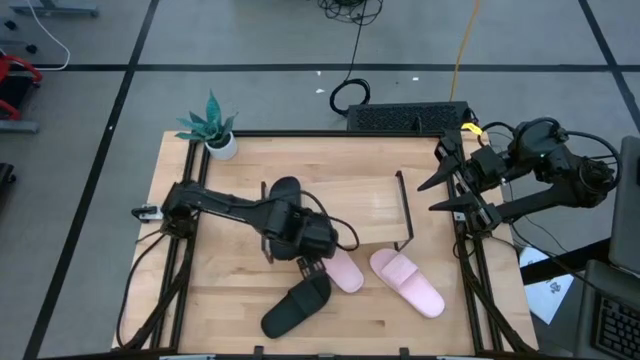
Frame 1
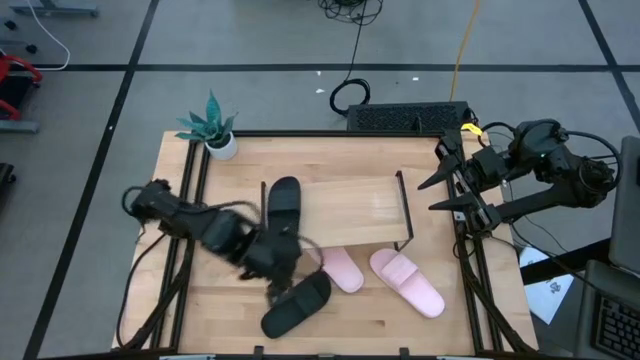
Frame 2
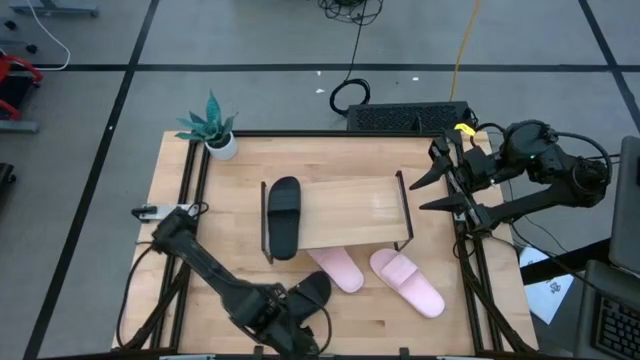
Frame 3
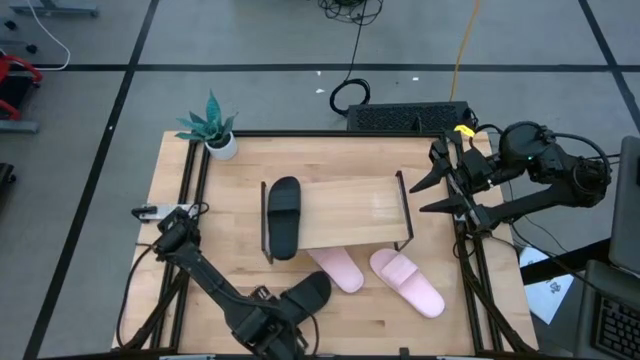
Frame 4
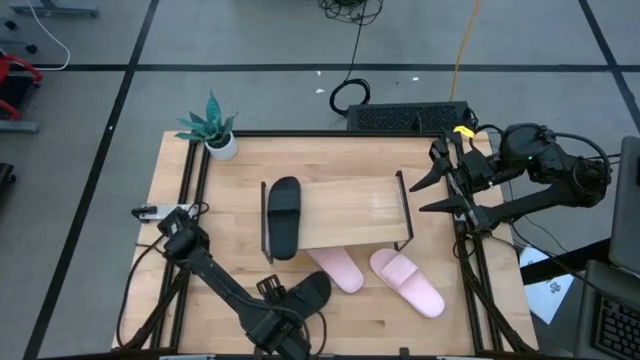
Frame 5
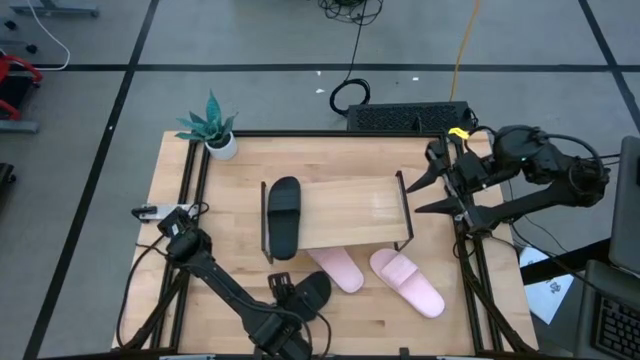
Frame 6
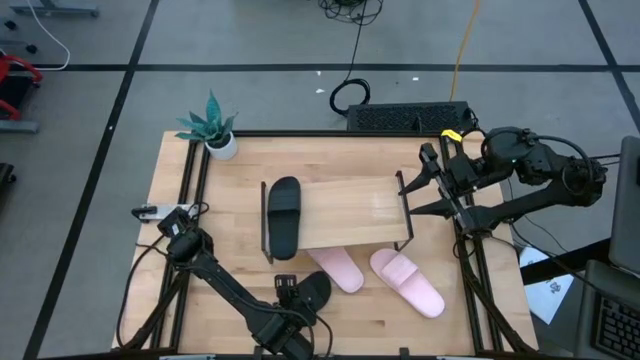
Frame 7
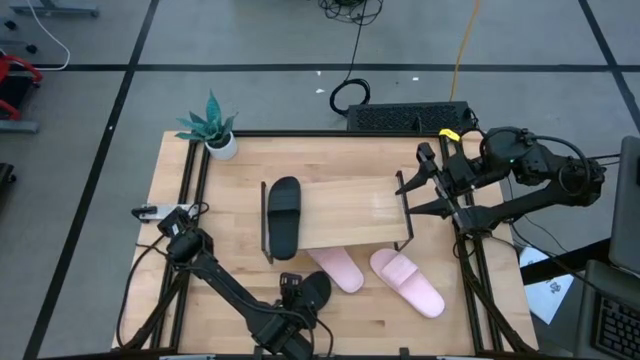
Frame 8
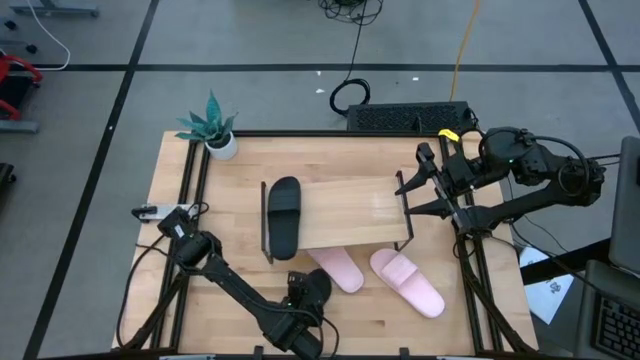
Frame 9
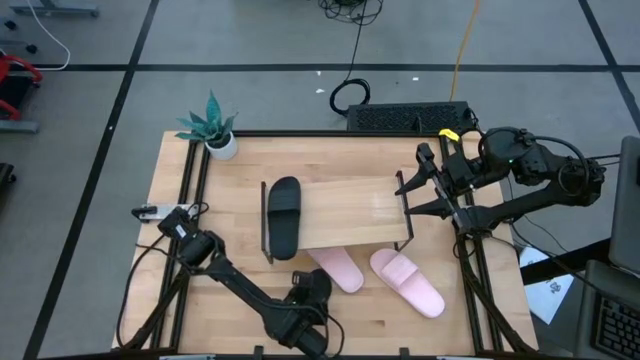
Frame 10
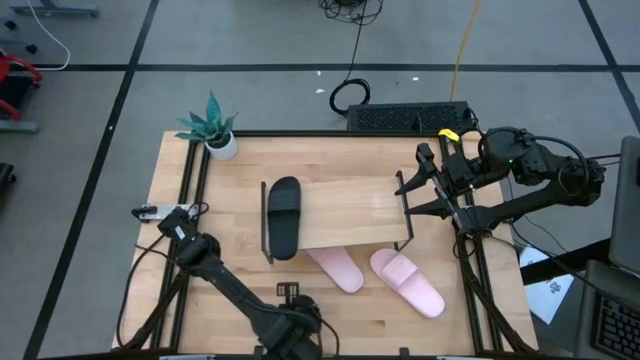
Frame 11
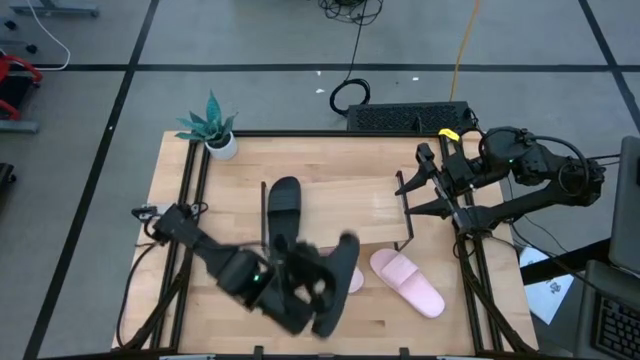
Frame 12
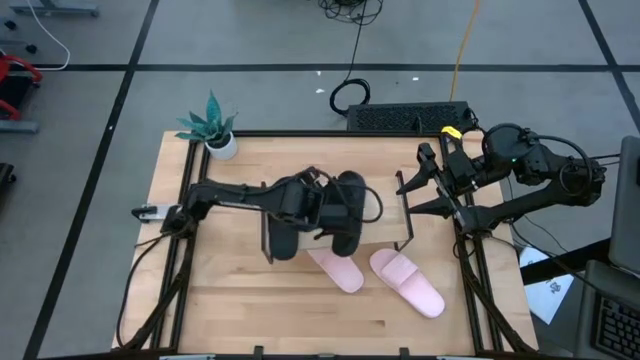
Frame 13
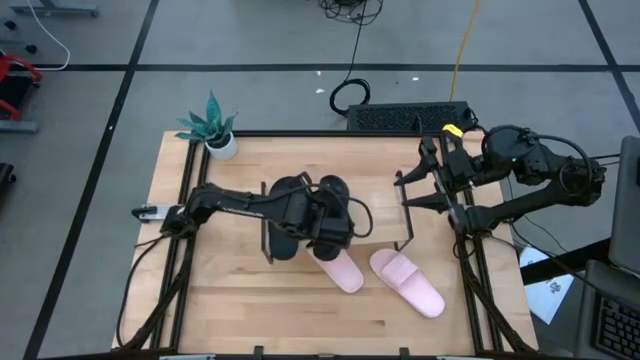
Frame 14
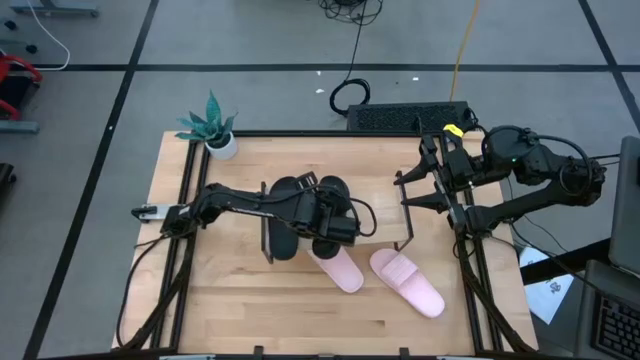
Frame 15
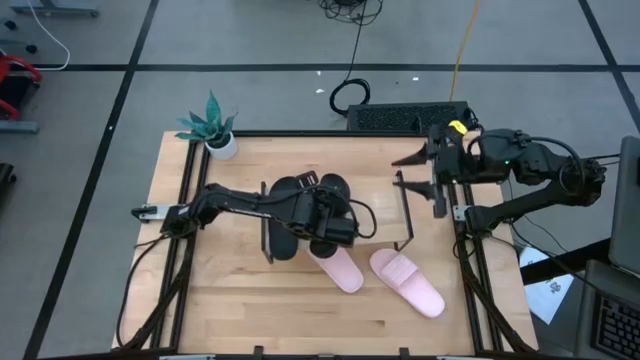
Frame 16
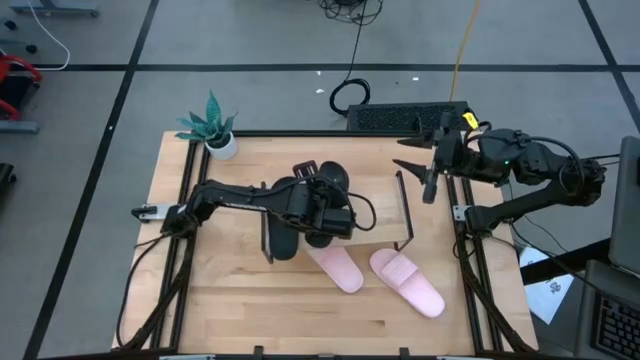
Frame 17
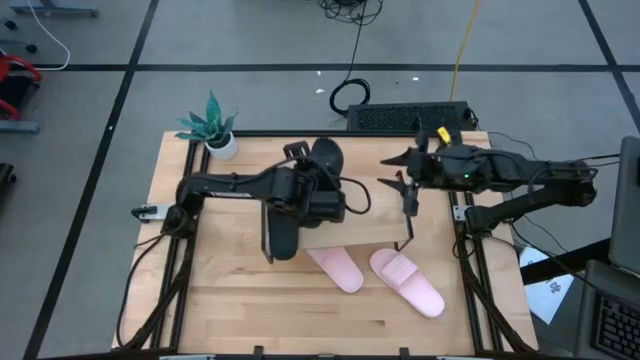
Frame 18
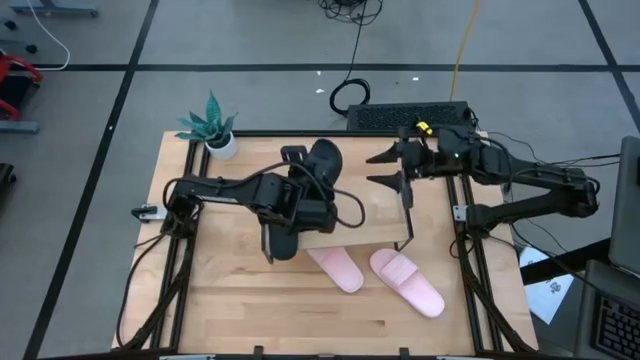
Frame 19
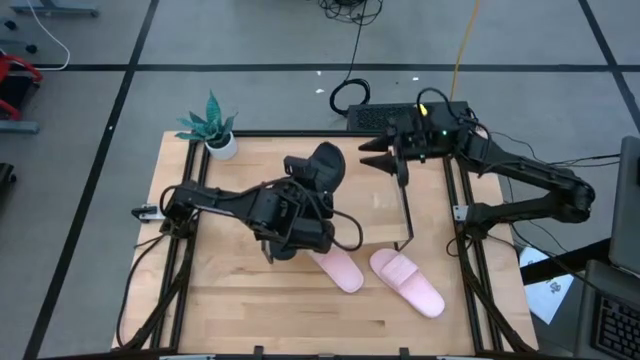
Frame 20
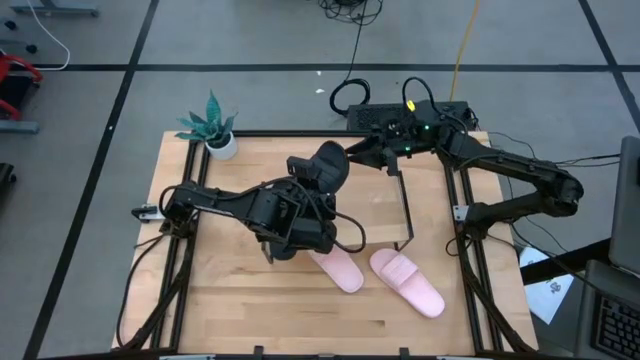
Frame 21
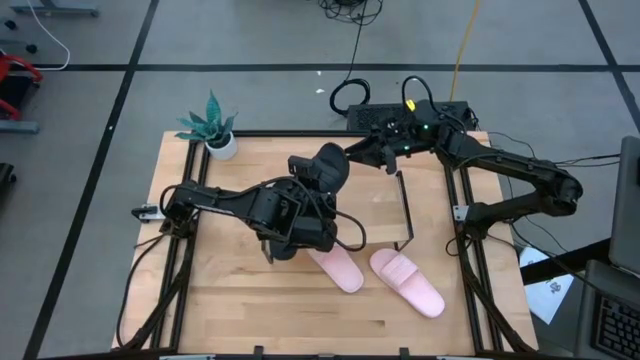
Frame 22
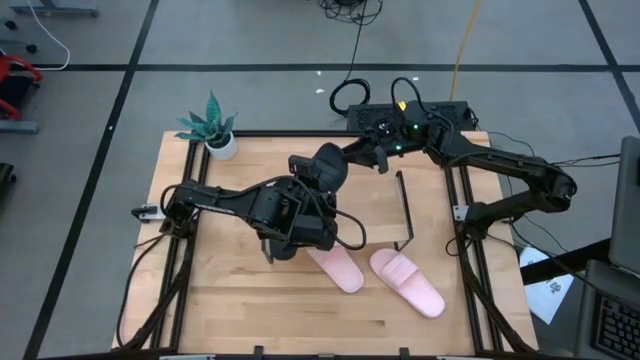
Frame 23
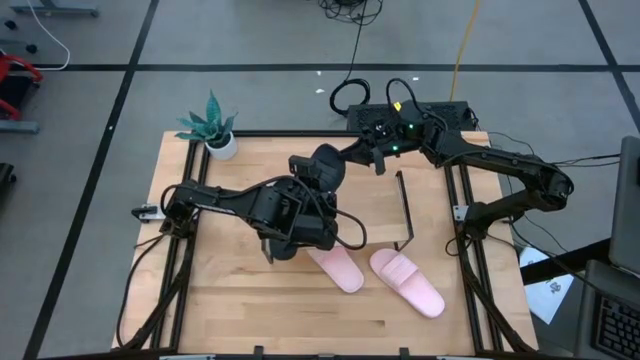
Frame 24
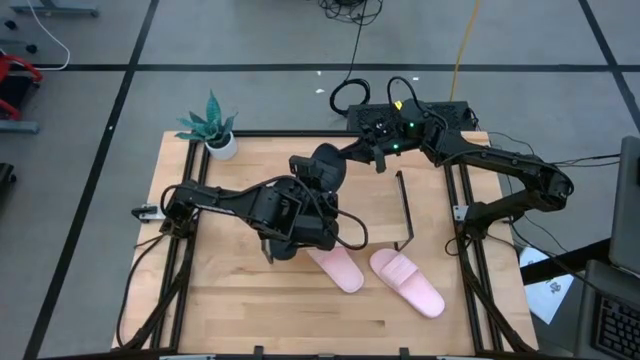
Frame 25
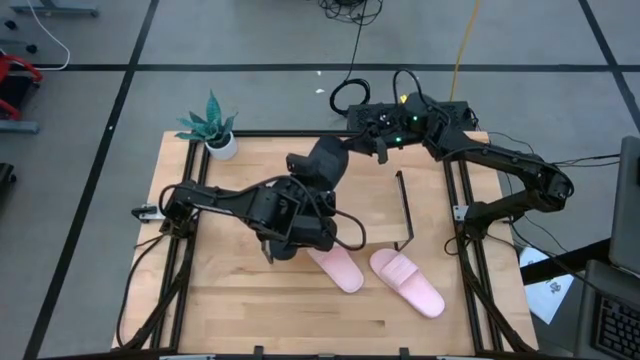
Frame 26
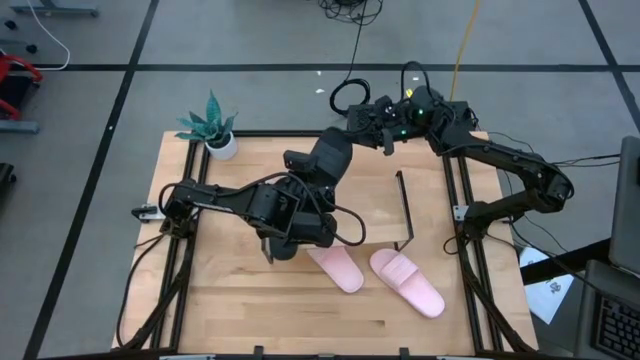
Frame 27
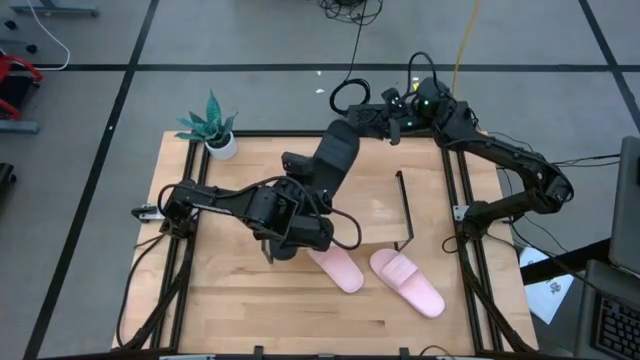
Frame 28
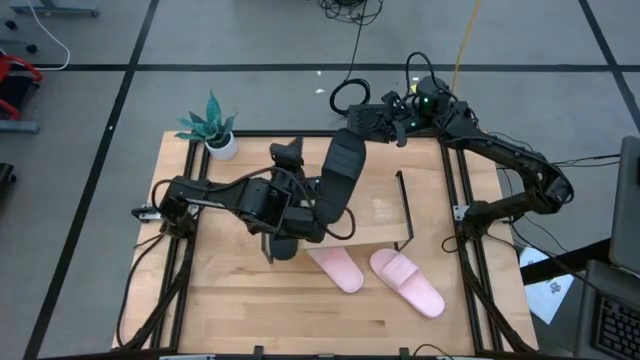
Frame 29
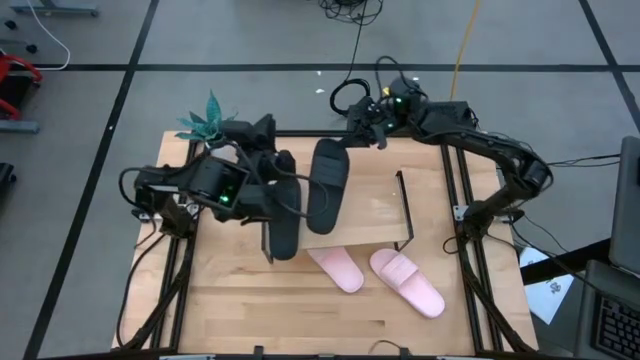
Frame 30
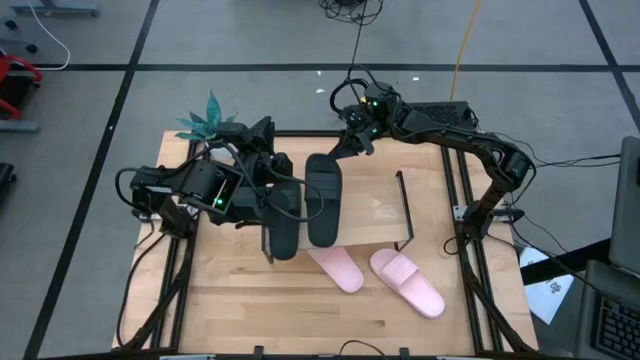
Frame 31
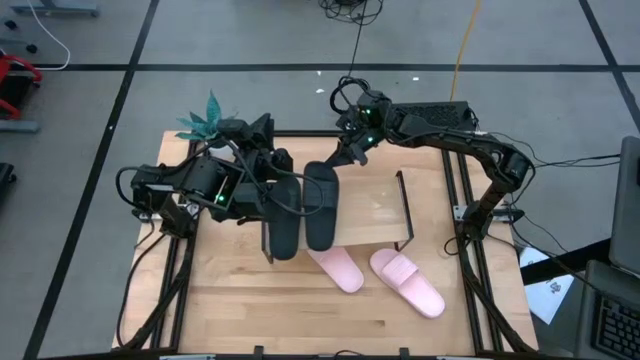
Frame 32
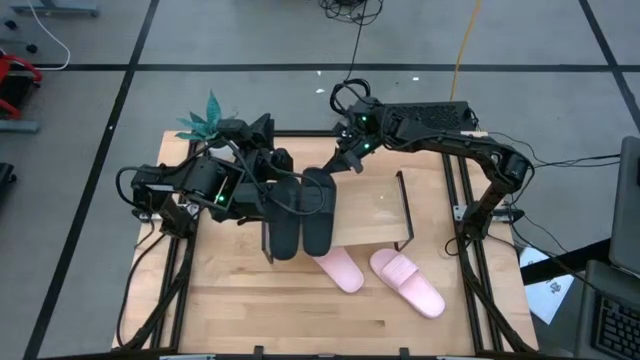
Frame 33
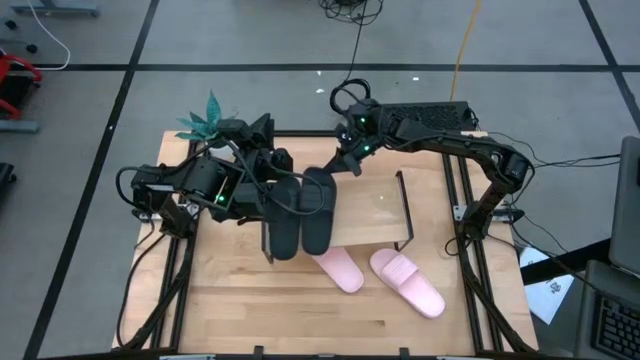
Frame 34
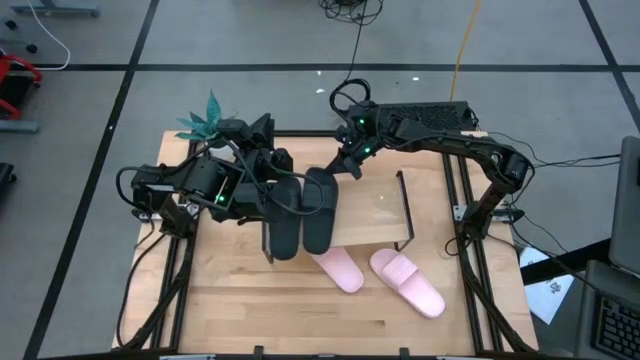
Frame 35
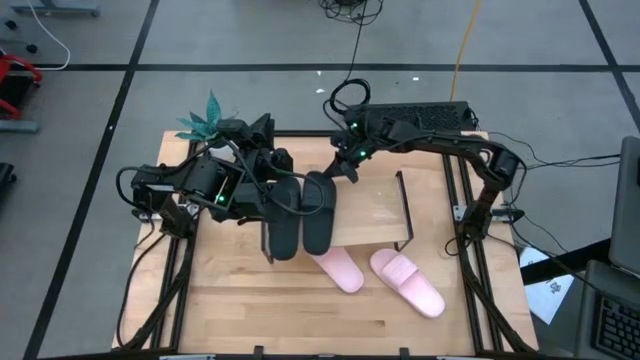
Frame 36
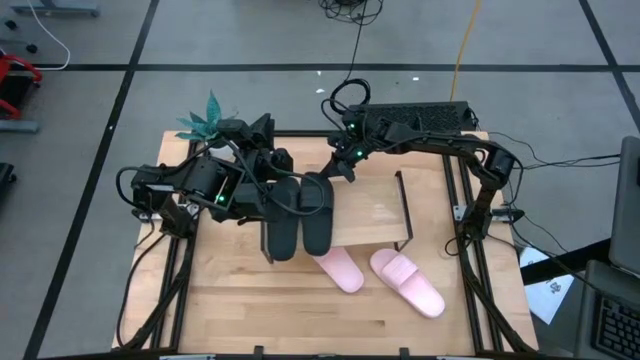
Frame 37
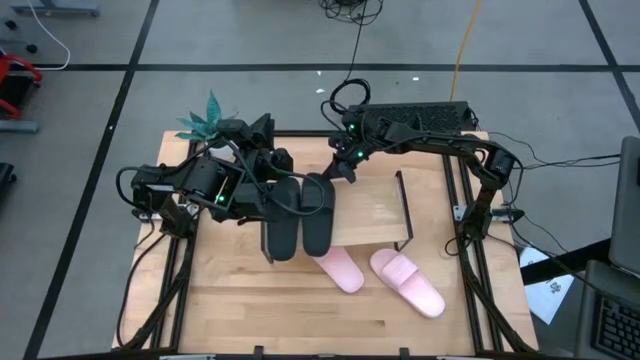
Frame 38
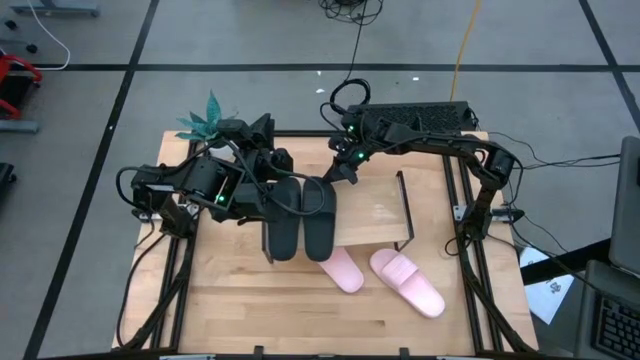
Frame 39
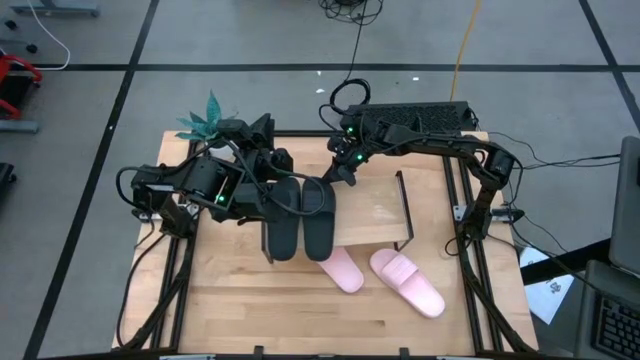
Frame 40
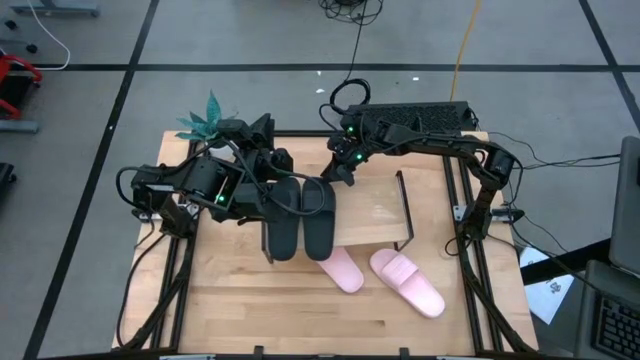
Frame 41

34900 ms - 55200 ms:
Task: Pick and place slides into the shelf
Put the black slipper on the shelf
